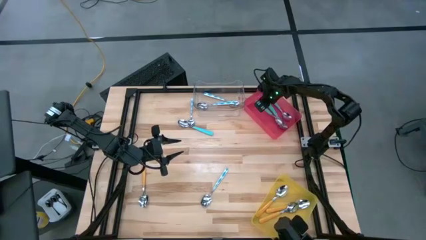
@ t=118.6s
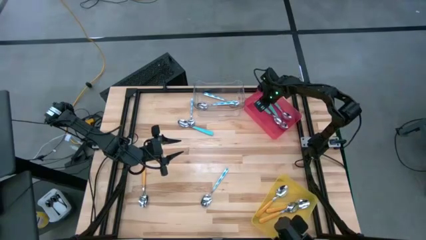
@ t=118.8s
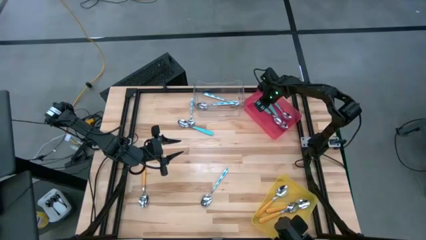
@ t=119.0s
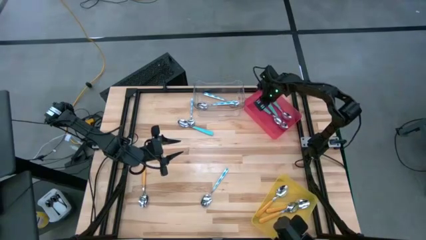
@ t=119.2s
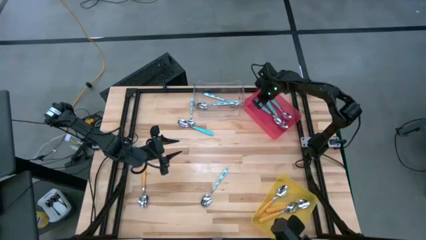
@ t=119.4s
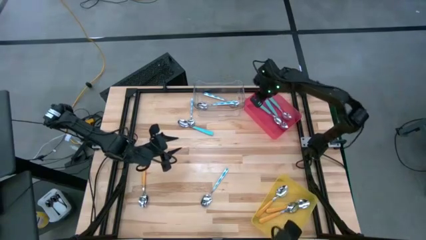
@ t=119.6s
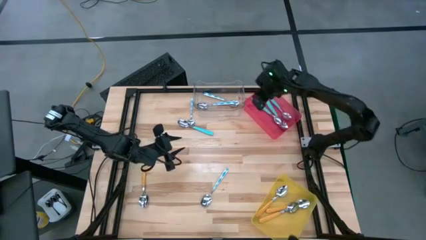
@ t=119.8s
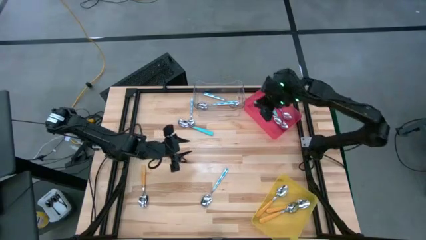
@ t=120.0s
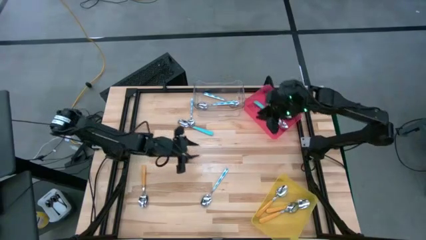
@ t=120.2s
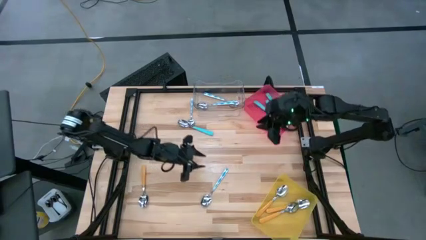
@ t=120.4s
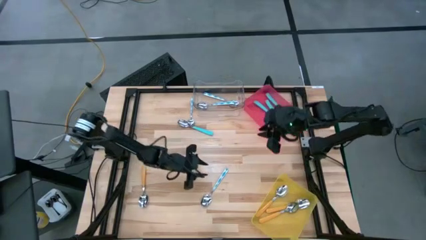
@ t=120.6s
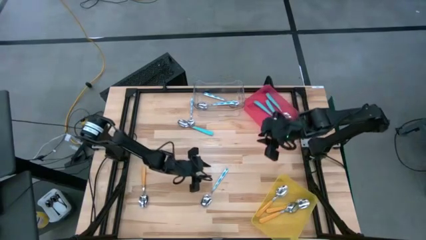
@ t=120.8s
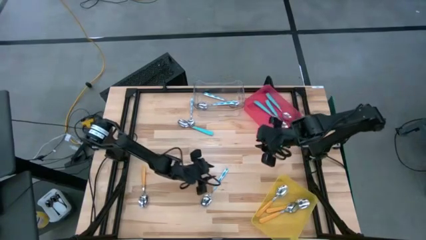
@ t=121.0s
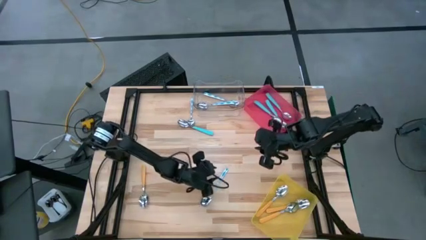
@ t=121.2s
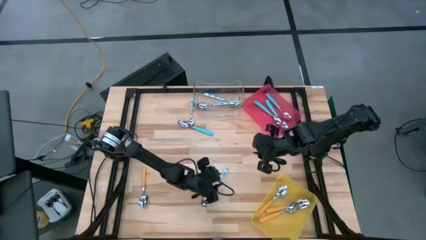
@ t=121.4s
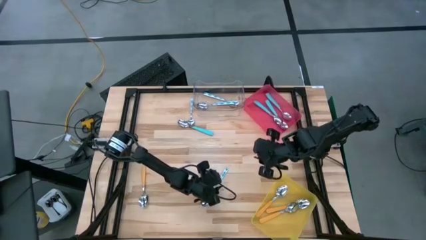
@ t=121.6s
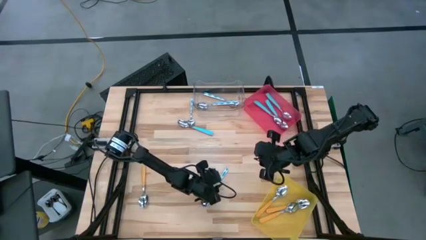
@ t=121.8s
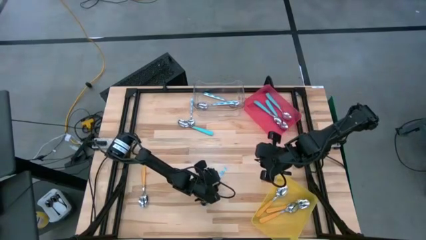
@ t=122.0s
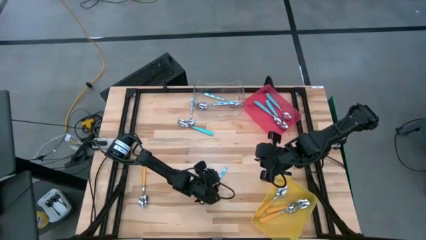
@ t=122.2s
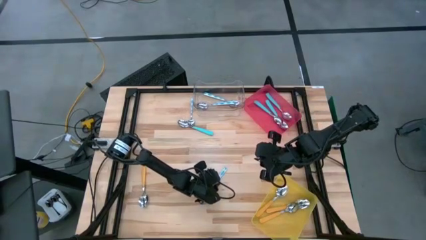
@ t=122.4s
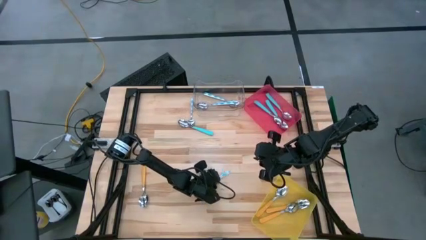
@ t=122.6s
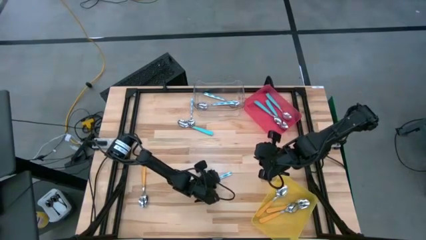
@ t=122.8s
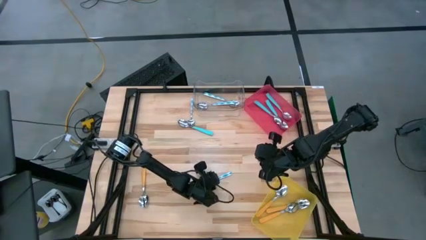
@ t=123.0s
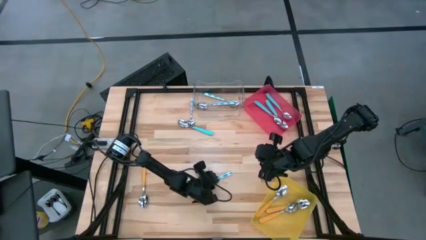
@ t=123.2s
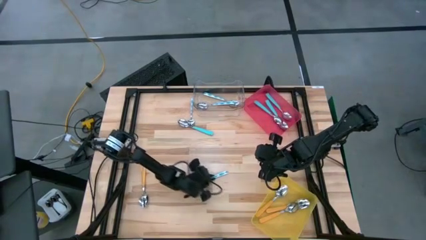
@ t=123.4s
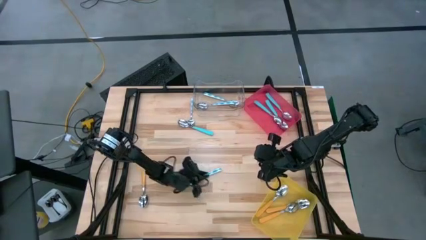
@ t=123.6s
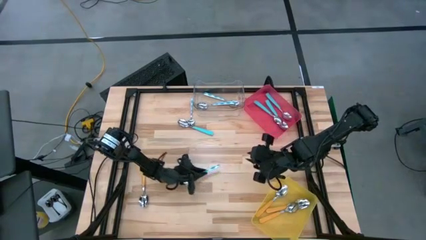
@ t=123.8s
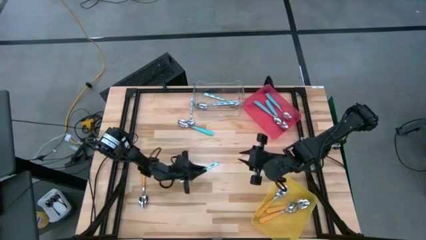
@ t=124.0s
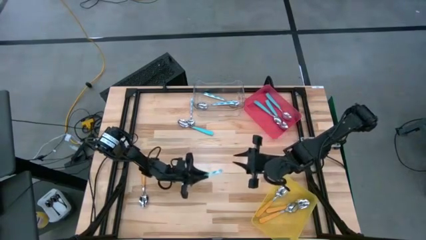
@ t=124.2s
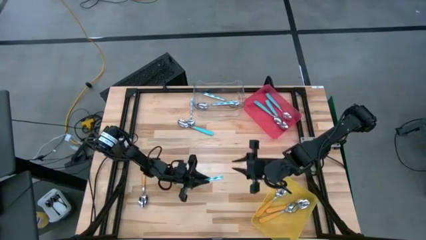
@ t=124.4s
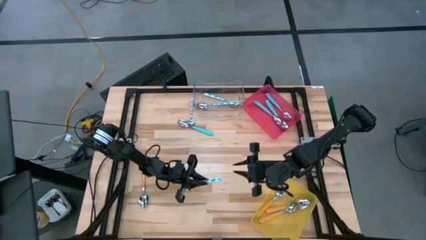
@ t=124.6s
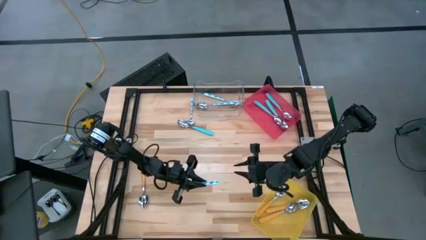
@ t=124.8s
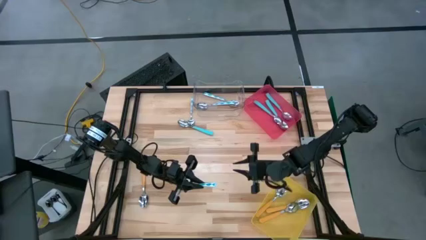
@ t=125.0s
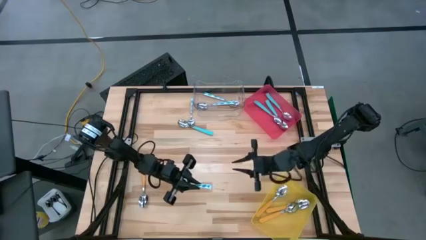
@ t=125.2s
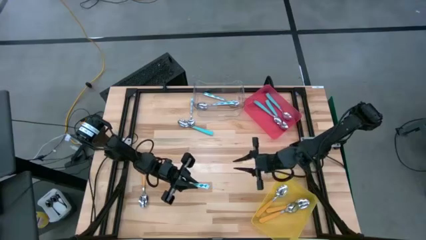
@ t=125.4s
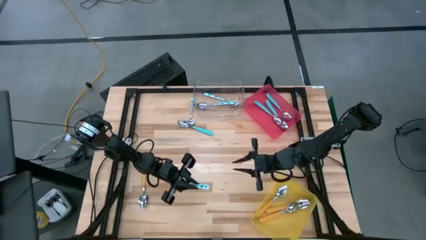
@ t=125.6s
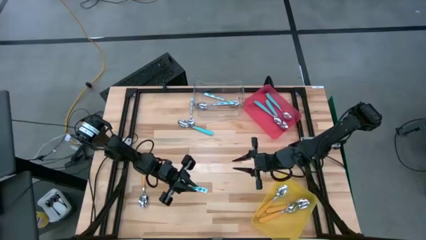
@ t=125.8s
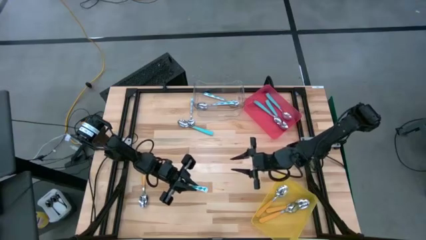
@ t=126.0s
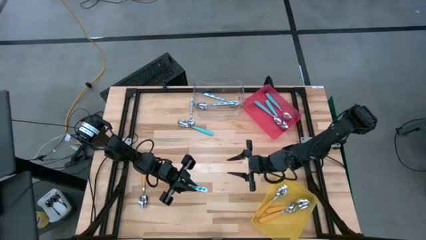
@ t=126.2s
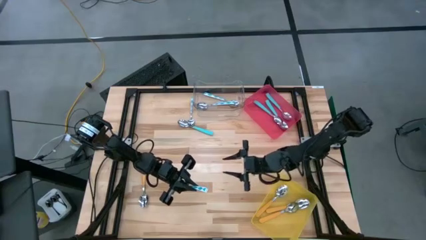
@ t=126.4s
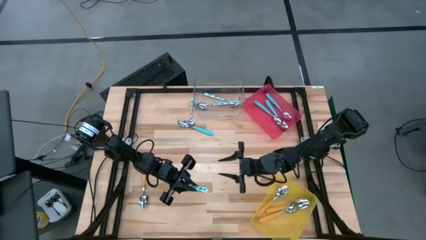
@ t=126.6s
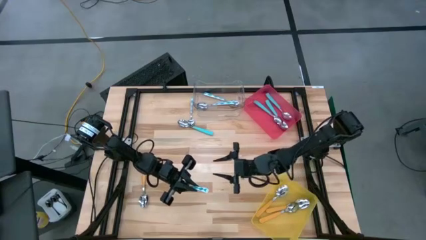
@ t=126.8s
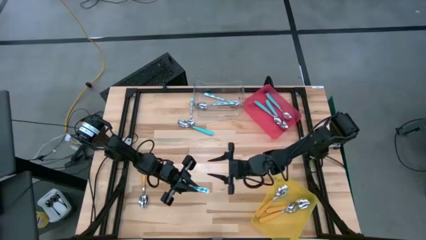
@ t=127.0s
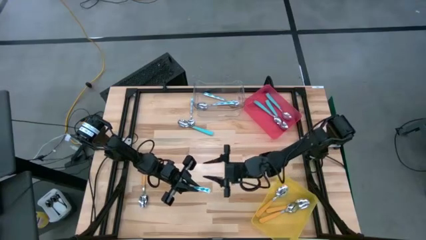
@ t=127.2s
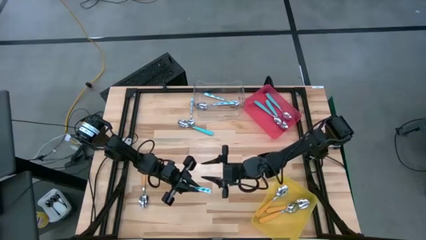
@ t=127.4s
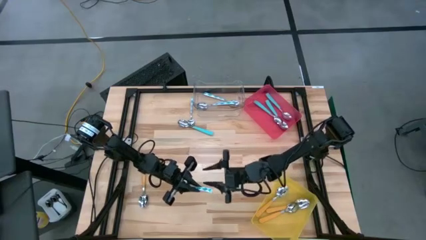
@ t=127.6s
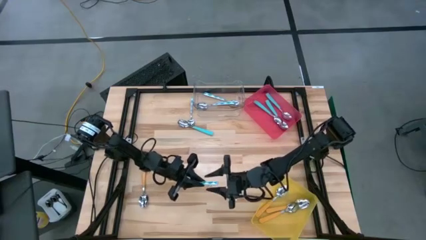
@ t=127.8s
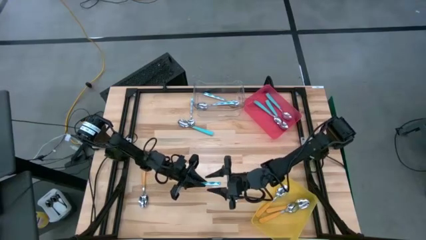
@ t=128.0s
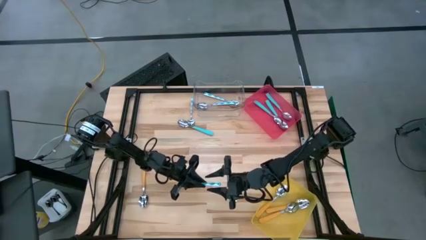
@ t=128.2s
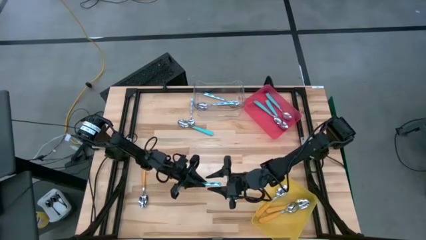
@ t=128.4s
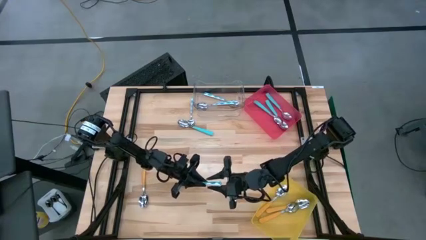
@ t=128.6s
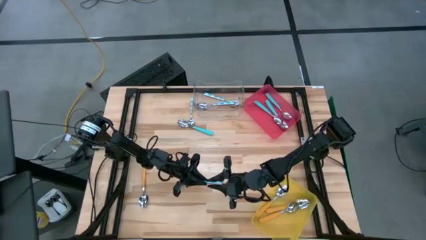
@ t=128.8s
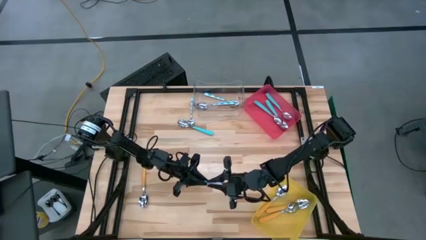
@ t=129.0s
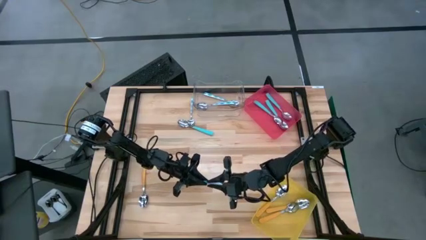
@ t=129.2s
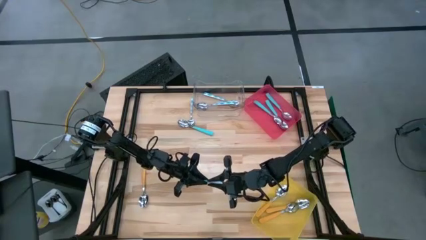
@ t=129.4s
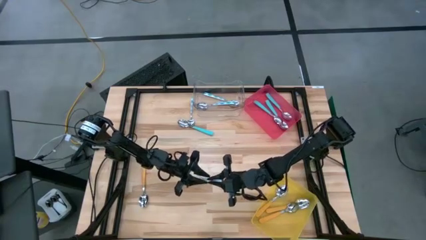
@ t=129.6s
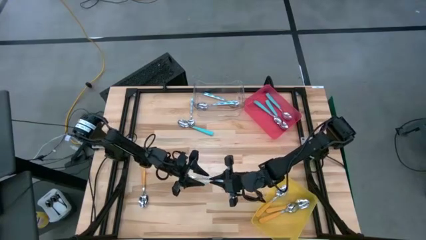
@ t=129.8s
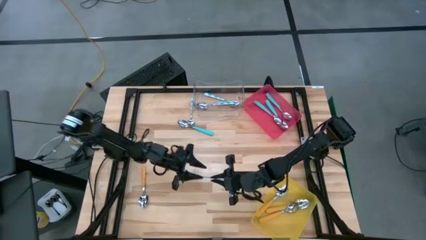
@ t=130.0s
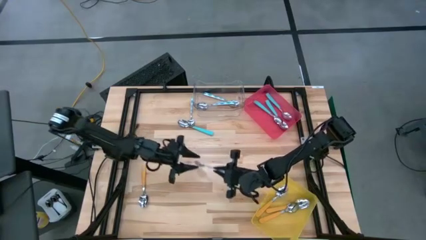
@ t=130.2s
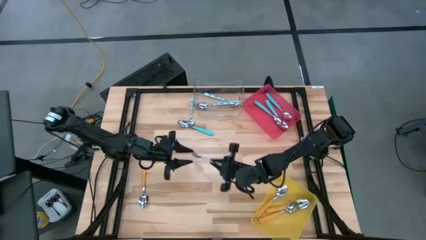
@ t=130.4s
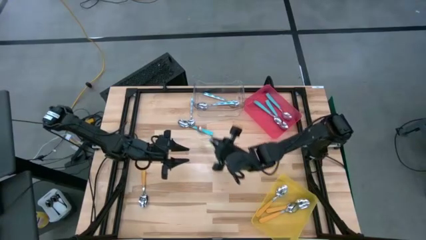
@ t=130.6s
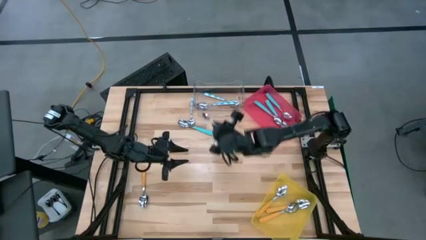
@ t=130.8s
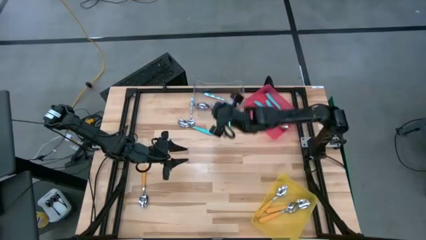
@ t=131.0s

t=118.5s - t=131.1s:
Task: Sort silverware by color (type)
Put the white-blue spoon into the transparent bin

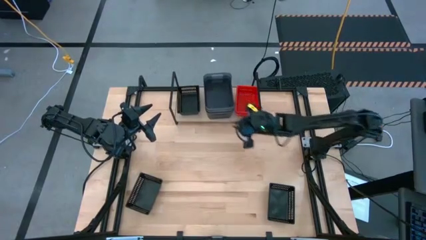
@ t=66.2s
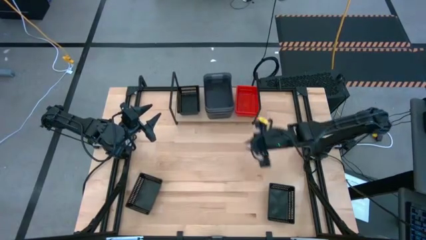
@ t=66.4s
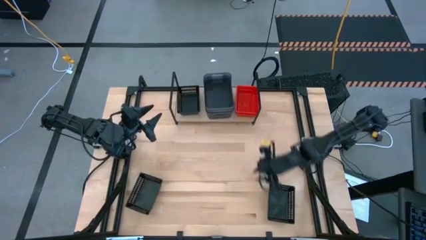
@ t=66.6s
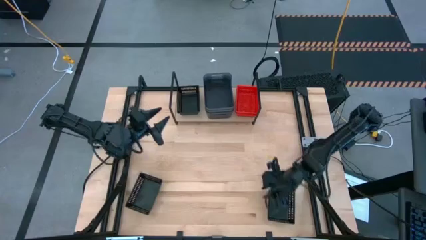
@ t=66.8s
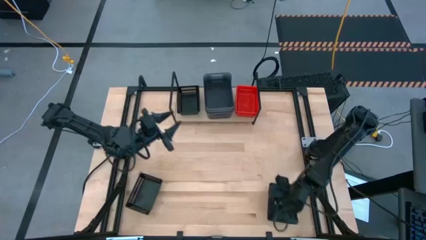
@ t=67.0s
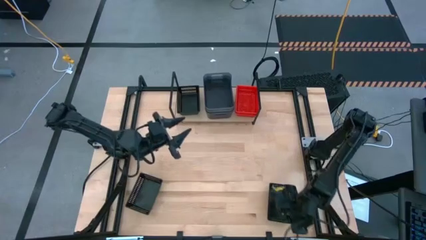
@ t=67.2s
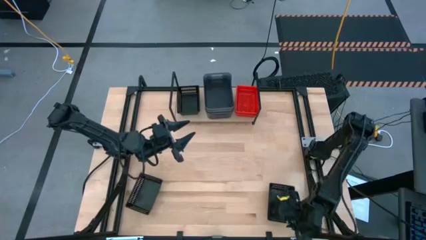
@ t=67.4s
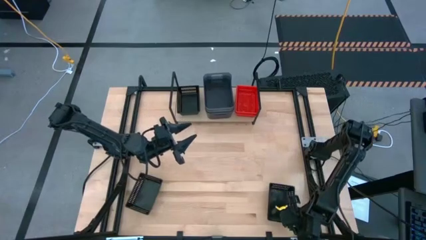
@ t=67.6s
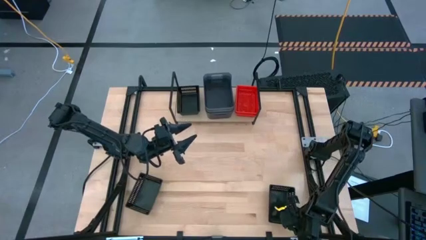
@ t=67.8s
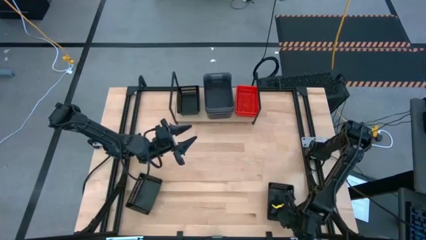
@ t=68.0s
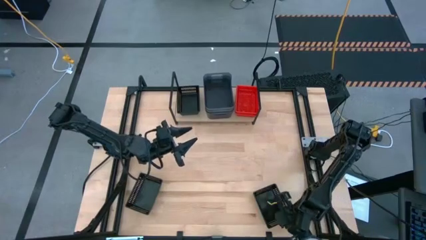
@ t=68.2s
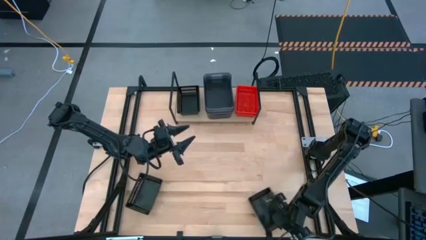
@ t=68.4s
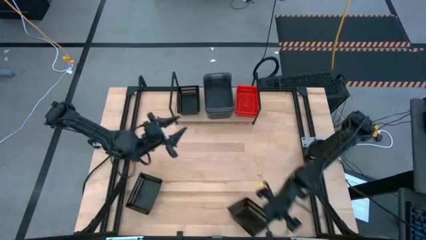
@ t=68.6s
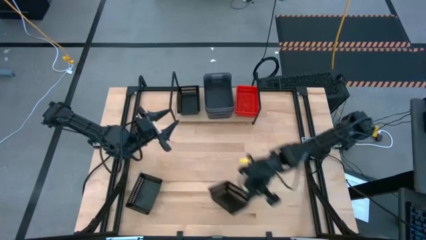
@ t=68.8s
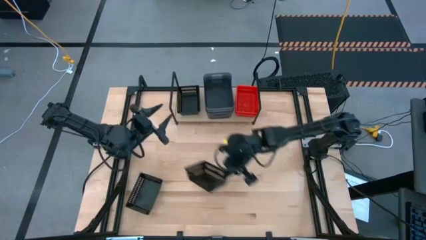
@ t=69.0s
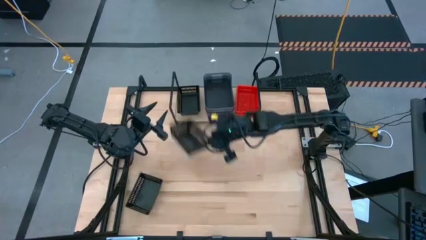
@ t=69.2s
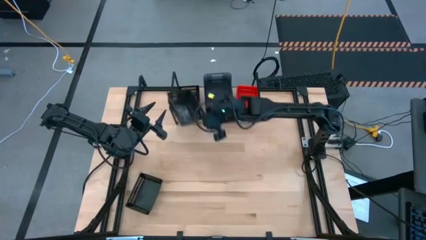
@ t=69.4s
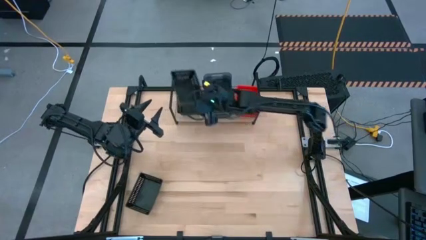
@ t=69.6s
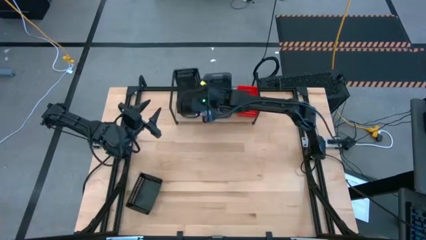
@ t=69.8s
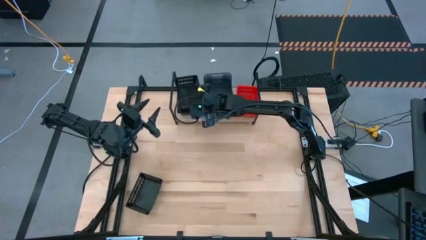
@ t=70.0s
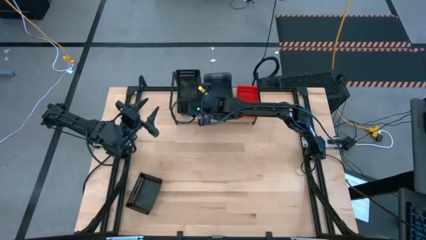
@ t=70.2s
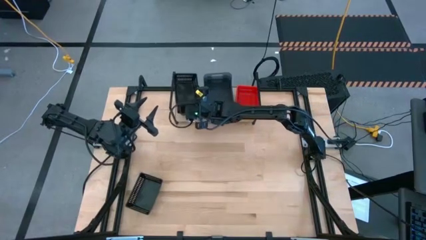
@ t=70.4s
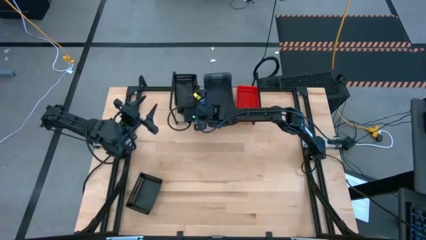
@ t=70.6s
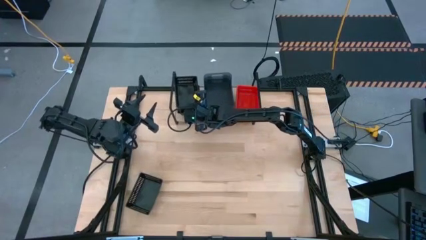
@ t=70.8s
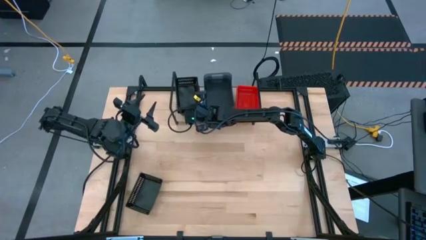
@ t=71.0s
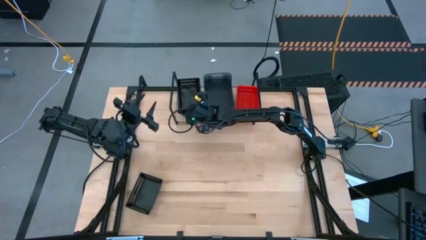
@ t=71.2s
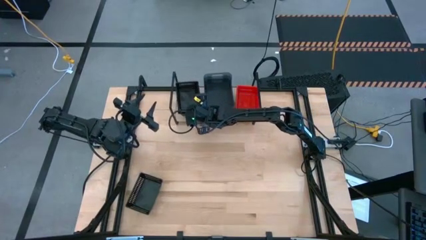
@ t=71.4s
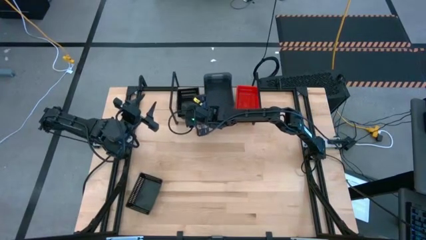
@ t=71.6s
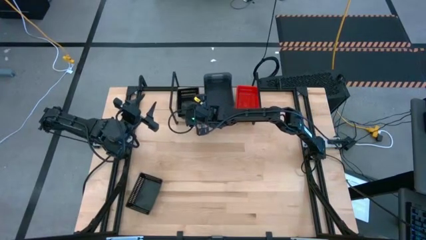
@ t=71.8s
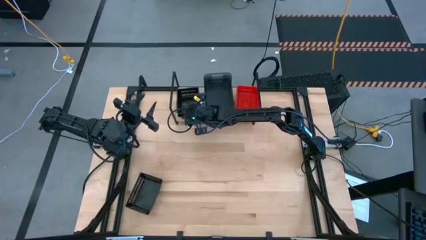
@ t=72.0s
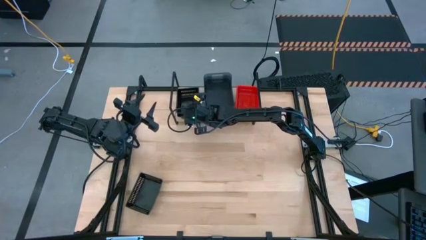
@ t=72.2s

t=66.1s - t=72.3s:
Task: Stack baskets on shelf by color
Stack the right black bin on top of the other black bin on the shelf
